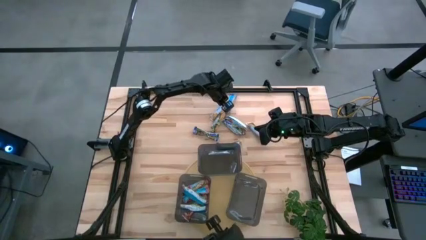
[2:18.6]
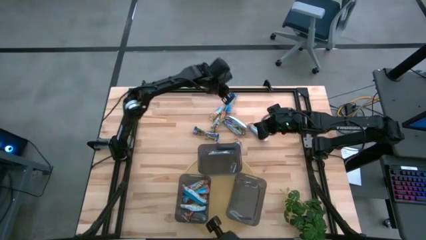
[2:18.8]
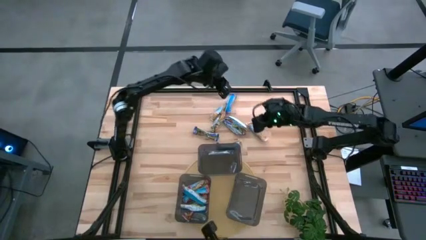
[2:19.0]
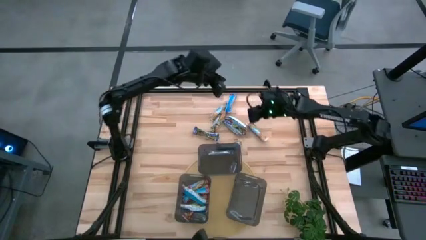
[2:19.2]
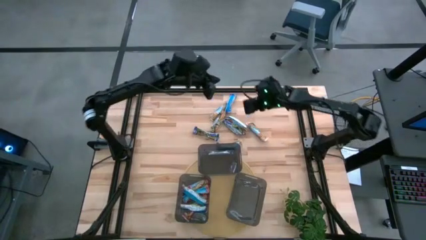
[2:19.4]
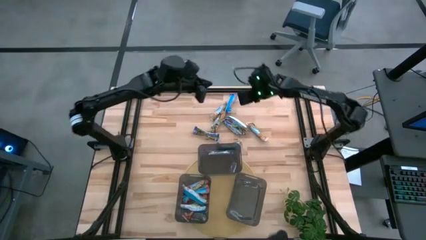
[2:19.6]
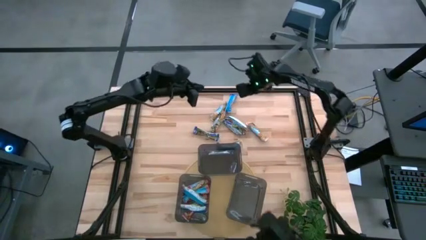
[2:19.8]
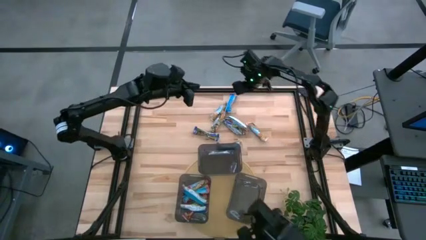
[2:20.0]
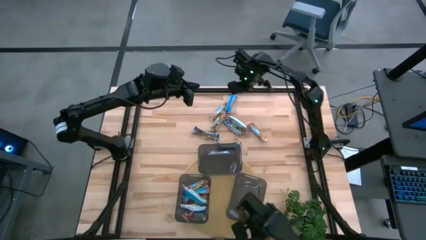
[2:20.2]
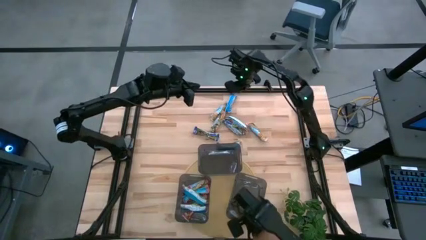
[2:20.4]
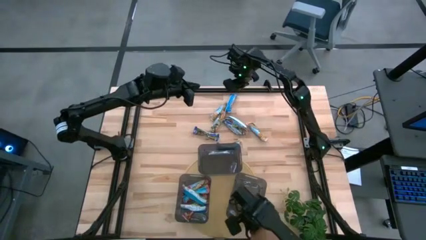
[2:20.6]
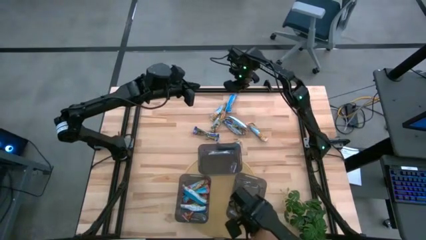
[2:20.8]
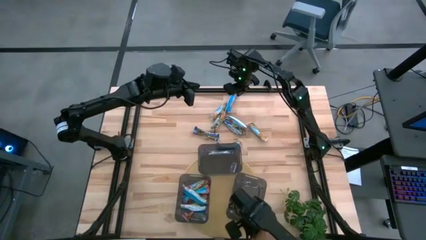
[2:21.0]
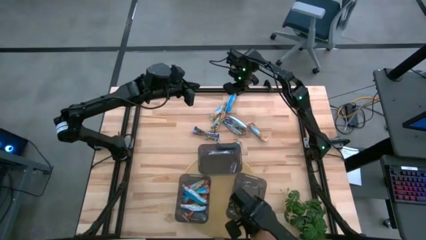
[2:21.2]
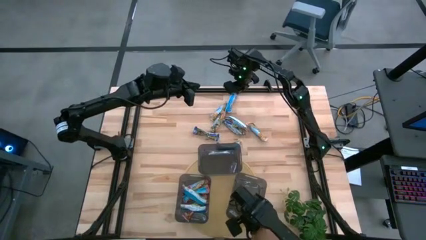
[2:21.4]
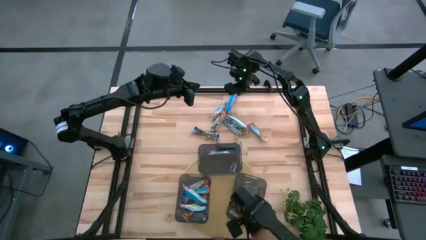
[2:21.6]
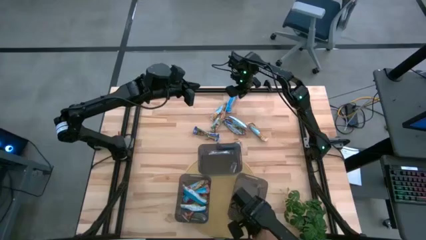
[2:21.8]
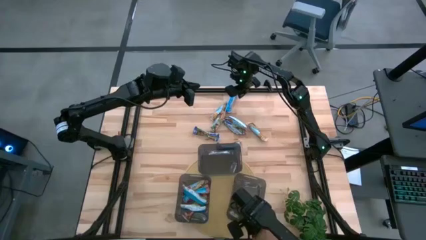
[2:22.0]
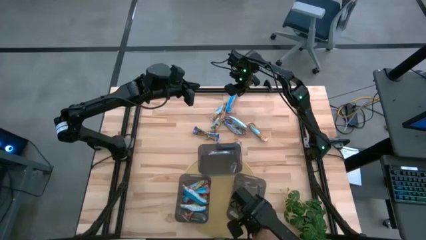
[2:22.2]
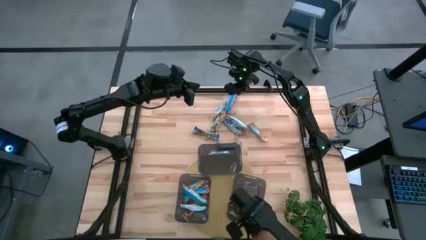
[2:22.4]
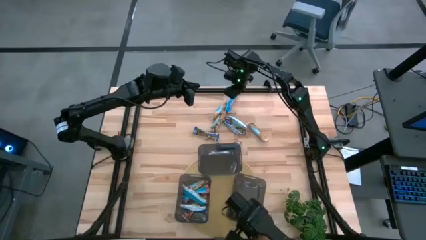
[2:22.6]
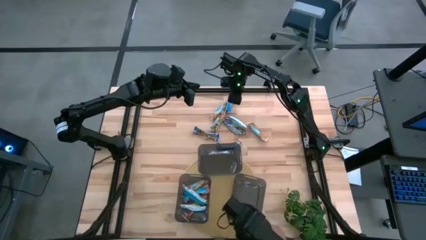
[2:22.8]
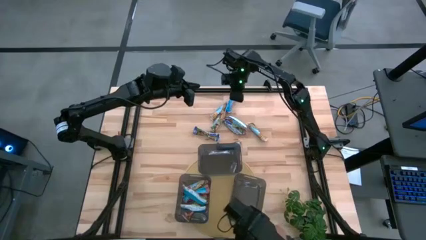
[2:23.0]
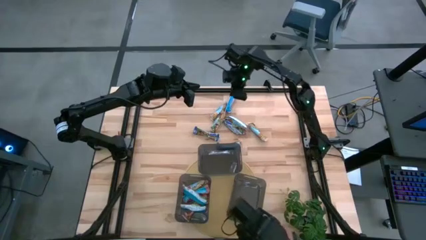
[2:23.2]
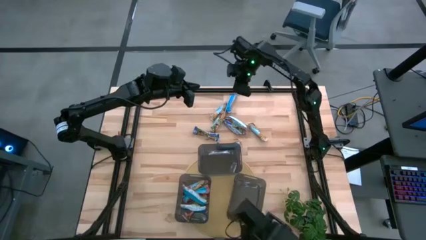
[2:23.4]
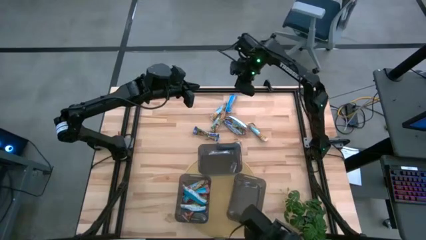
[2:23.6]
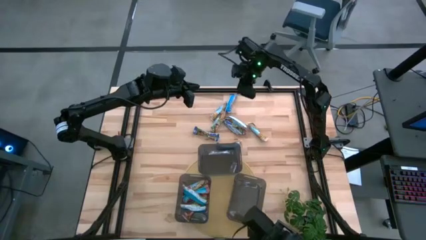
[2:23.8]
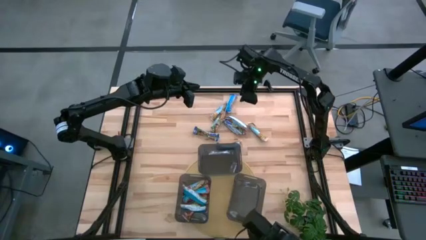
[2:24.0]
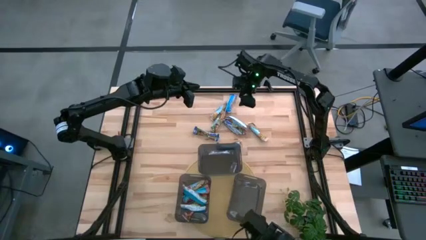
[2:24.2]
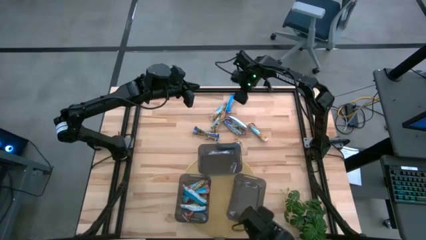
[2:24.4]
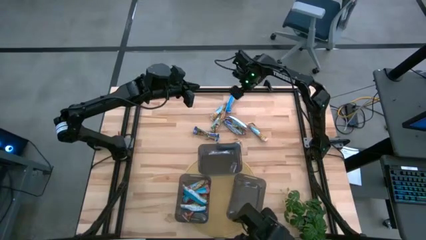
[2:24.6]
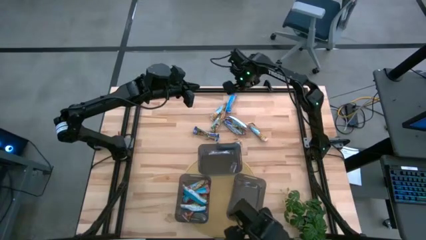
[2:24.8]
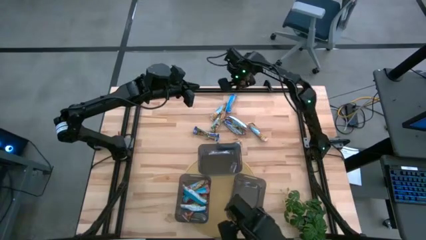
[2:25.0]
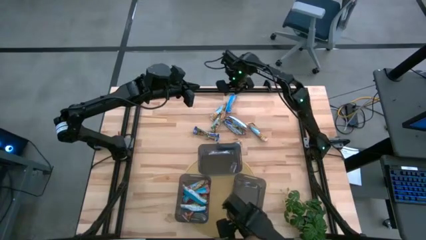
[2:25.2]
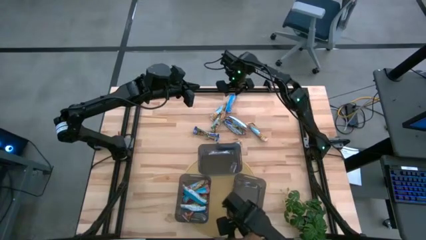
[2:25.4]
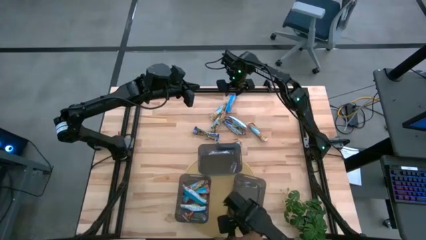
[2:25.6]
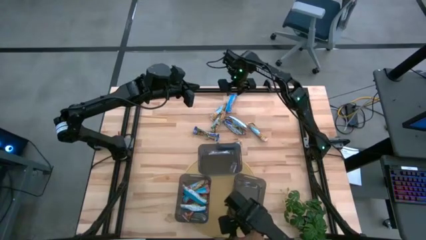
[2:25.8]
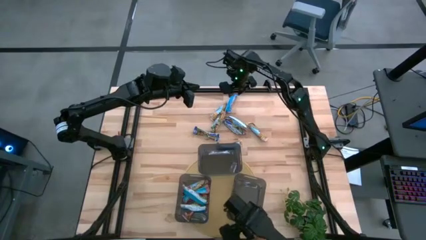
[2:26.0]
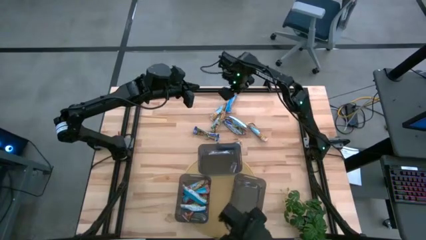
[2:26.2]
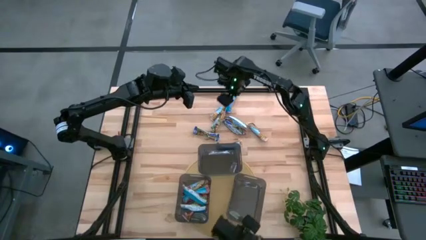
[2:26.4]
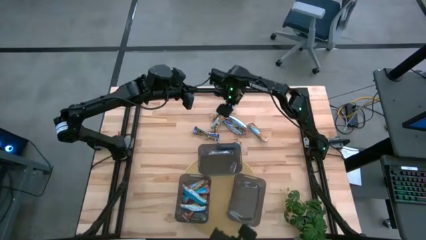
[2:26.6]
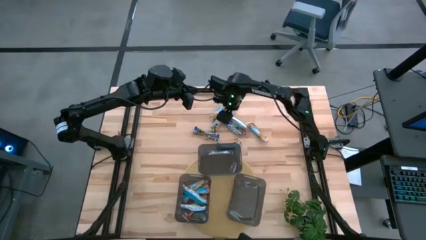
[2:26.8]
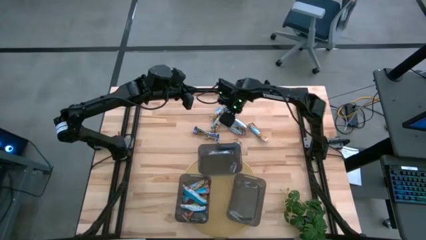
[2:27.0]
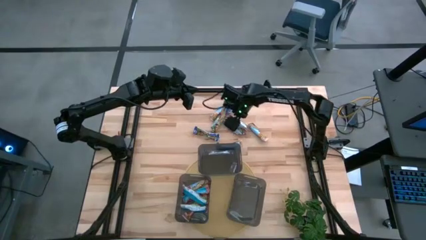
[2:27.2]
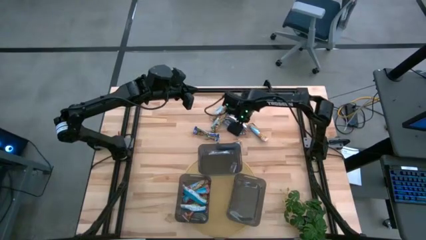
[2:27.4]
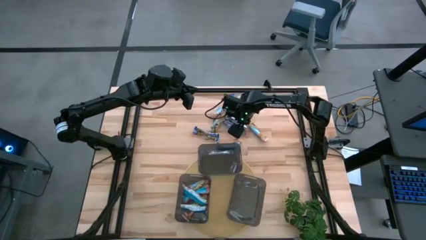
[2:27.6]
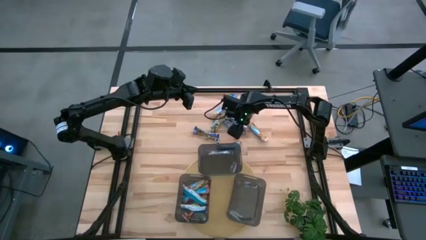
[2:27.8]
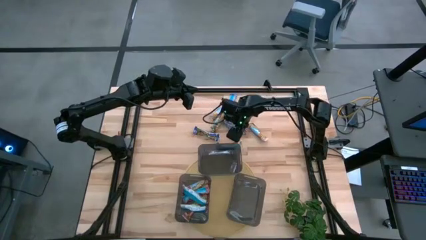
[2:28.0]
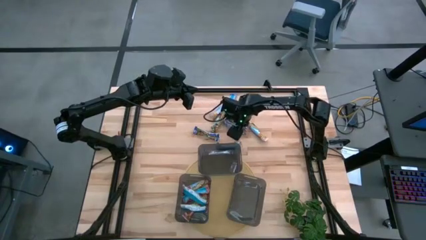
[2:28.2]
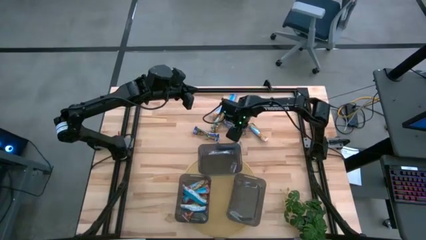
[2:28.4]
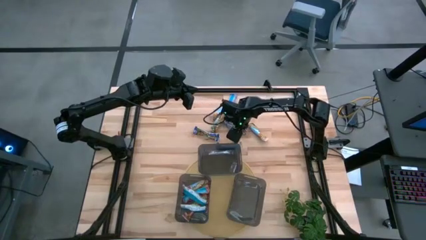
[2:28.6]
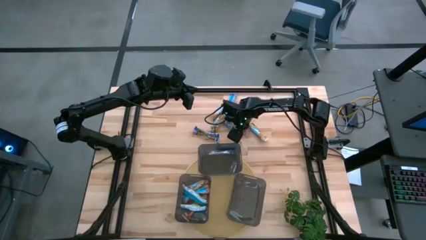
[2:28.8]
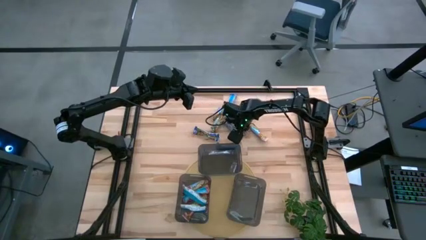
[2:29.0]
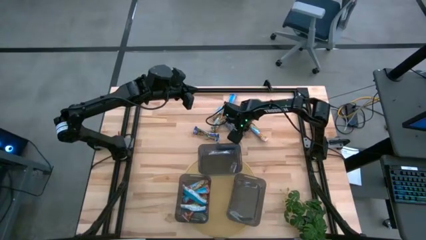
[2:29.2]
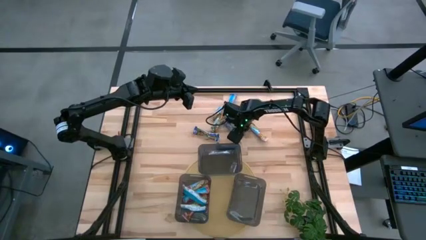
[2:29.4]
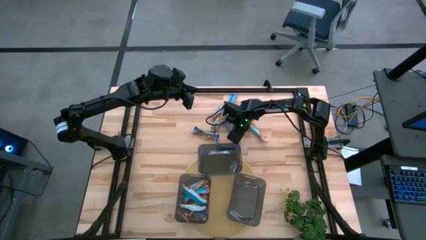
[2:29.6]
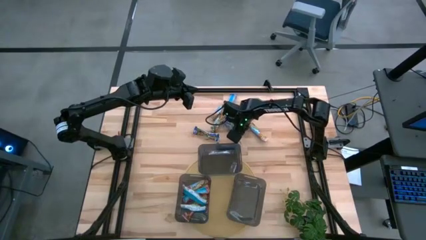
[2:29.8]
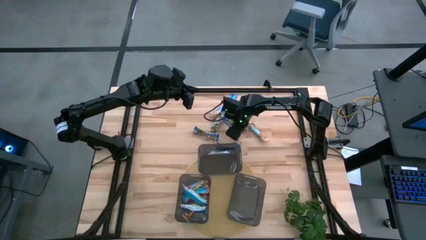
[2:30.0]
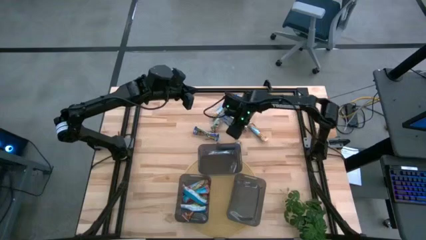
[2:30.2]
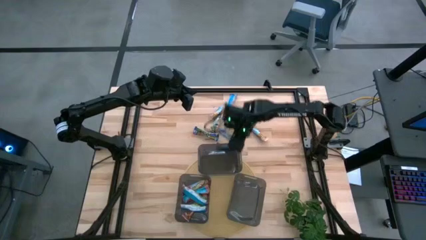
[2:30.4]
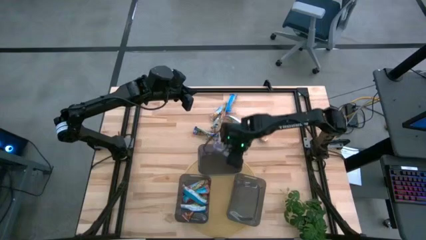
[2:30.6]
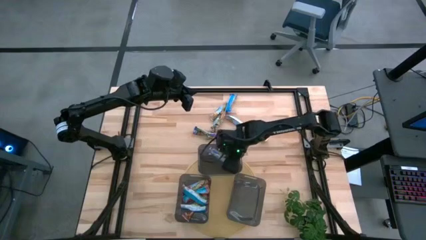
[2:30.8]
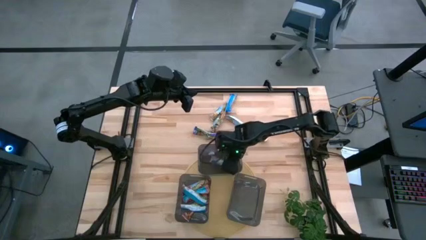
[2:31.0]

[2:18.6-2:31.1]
Task: Pick and place Granola Bars by type
Put the bottom right blue granola bar into the top black bin

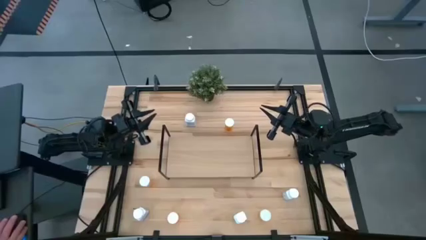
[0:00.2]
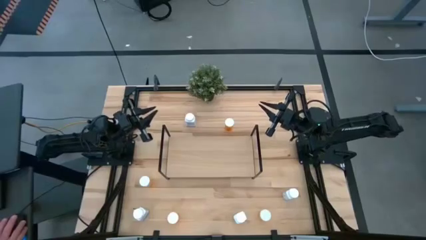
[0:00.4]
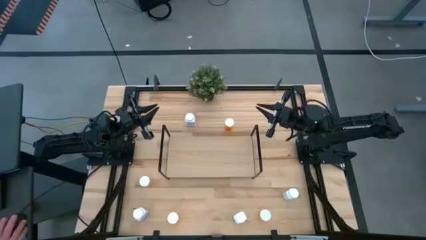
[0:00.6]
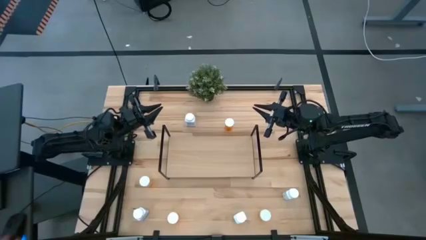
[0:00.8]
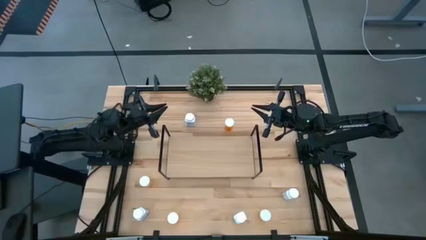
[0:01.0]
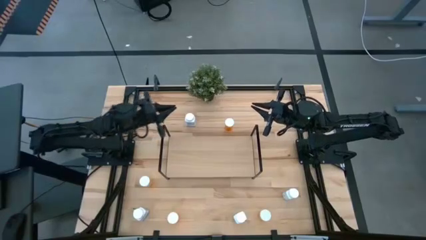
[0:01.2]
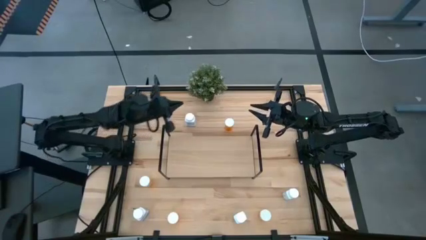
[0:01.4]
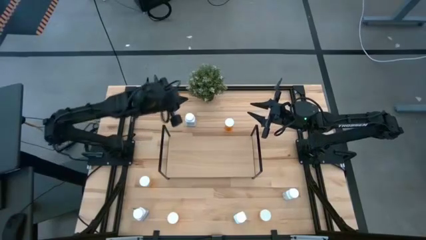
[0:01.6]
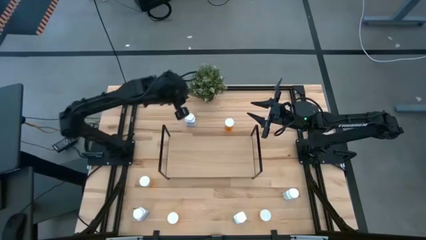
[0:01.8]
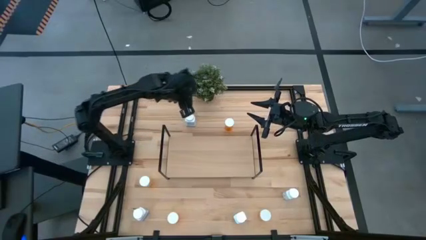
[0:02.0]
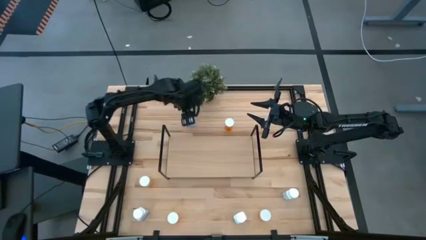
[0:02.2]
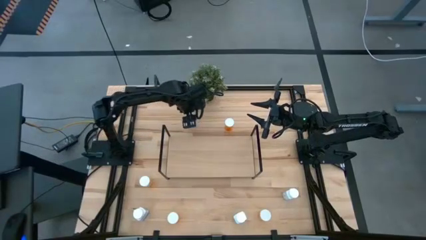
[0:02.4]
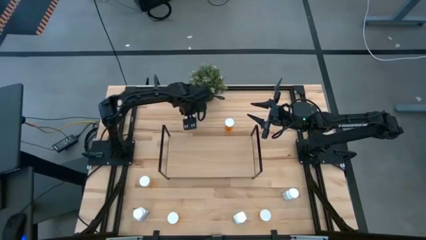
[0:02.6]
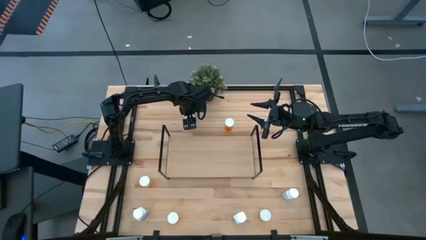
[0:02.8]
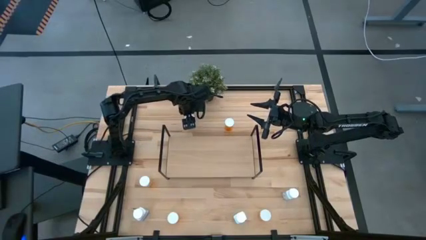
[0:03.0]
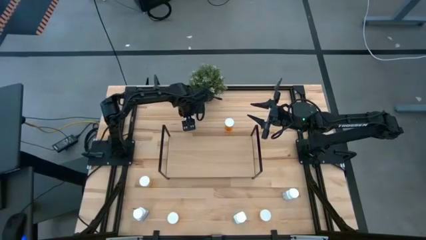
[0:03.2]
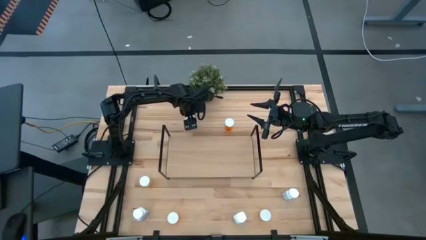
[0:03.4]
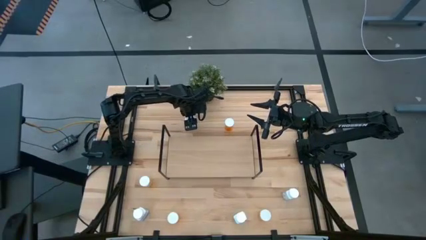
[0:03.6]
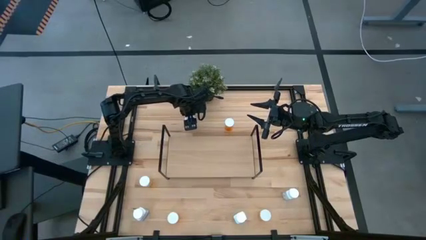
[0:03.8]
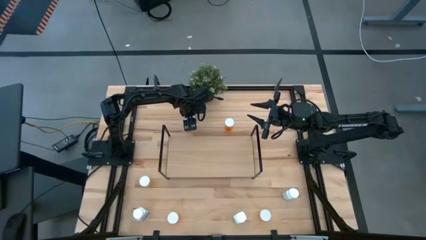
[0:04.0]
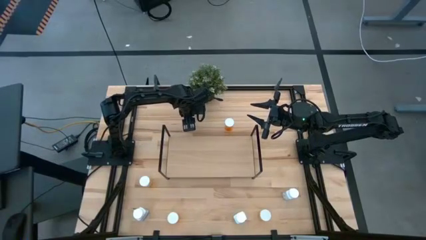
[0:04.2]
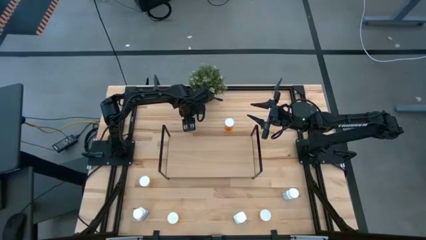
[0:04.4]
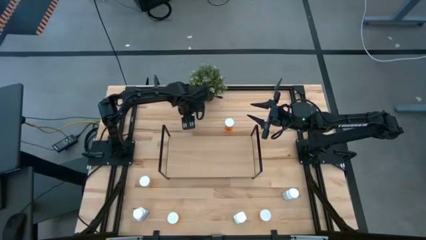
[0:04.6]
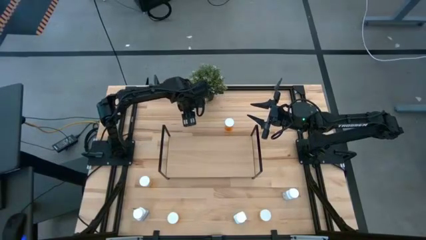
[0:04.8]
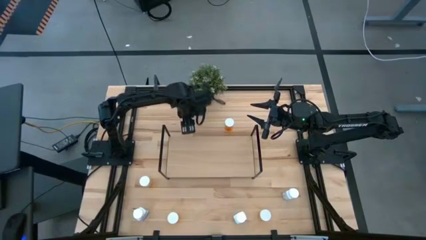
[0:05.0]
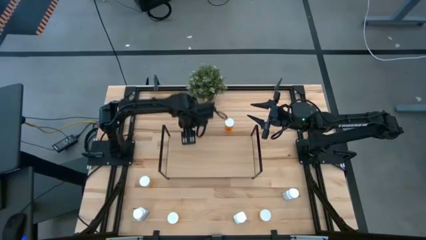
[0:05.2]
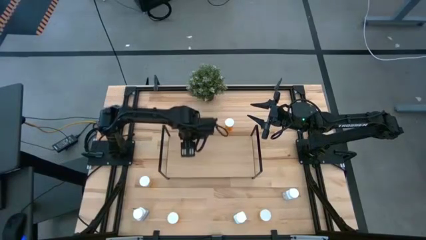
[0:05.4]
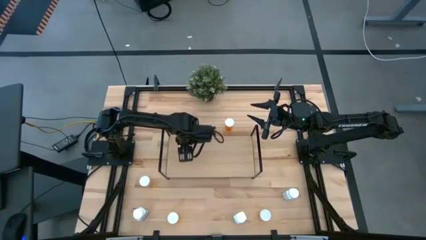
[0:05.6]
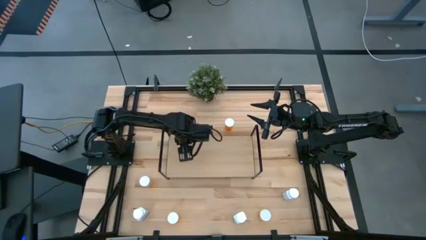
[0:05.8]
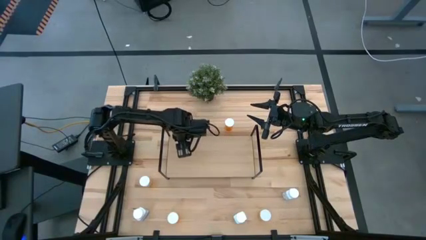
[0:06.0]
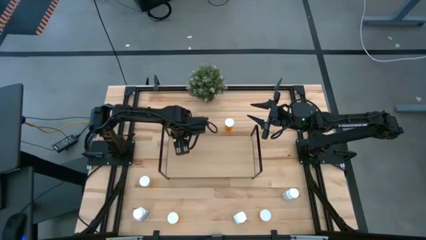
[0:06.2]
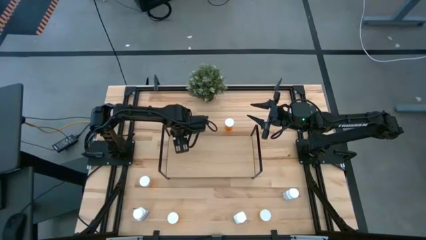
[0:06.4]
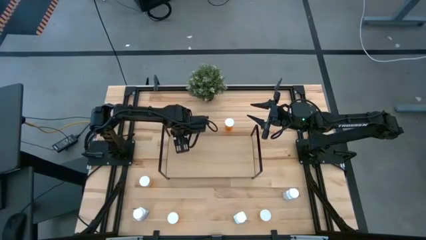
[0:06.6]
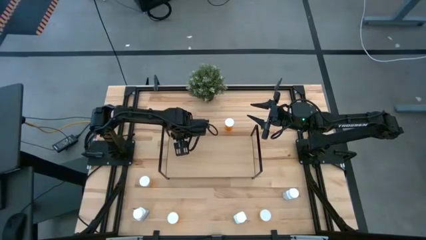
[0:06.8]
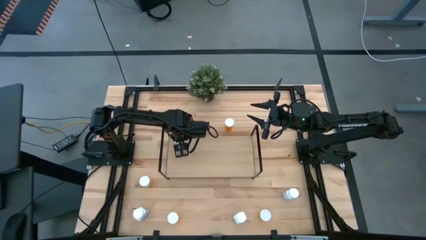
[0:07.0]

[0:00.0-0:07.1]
Task: Pick and place medicine bottles onto shelf by color
Put the top white pill bottle on the shelf
